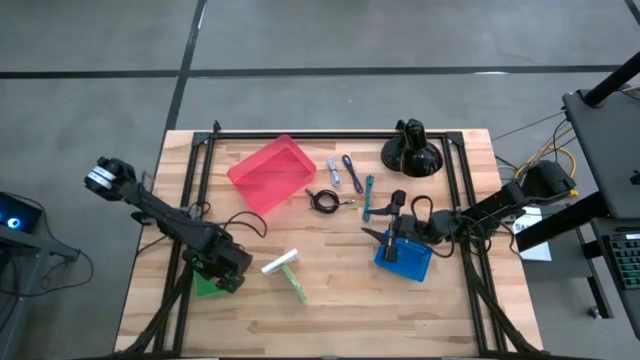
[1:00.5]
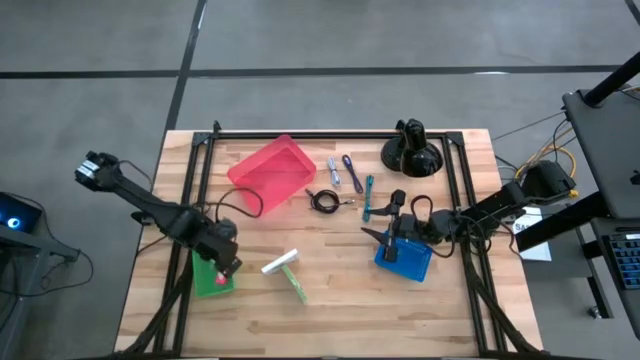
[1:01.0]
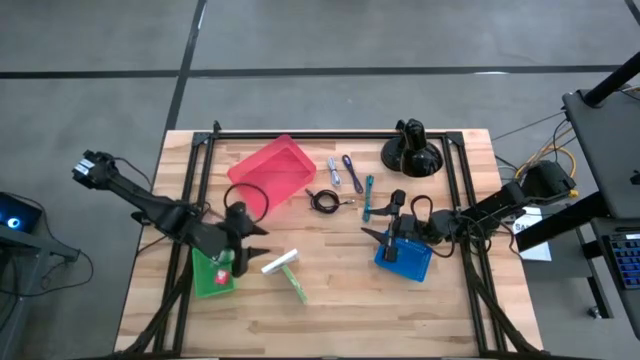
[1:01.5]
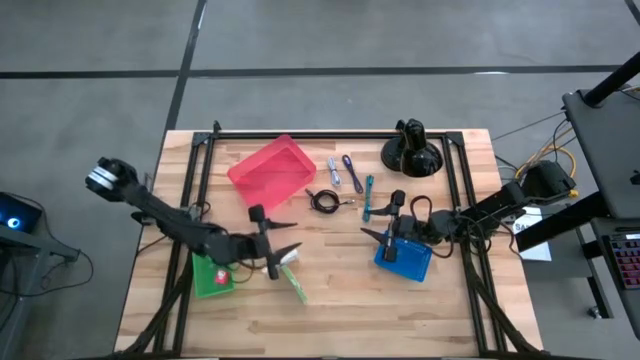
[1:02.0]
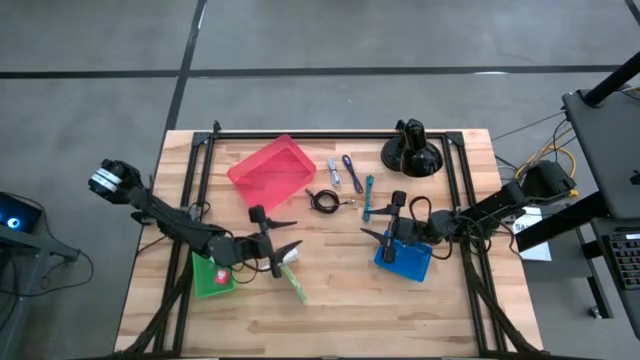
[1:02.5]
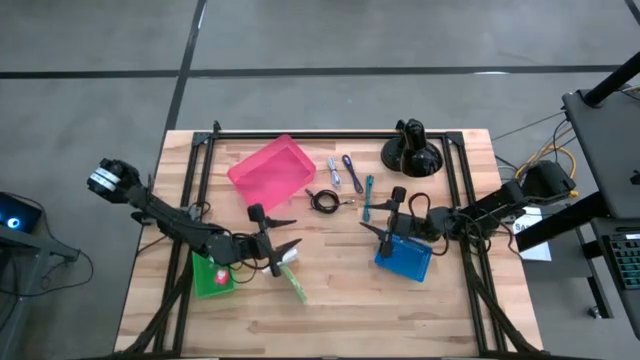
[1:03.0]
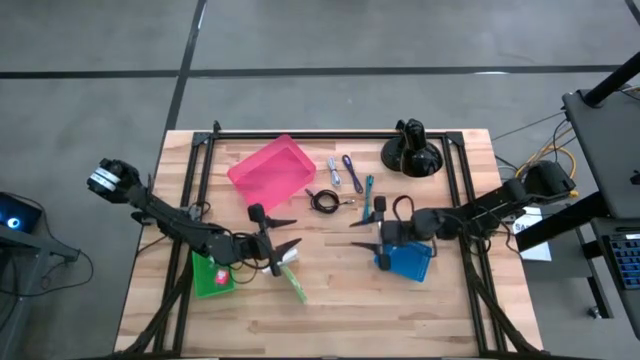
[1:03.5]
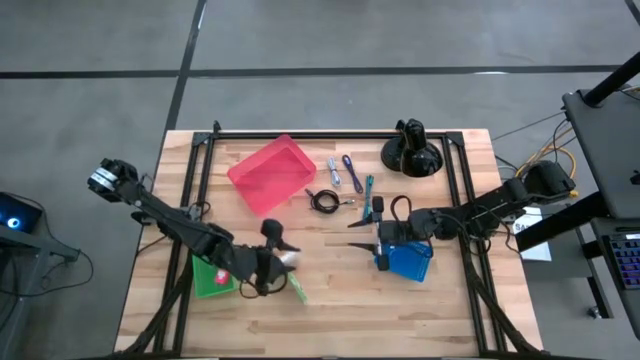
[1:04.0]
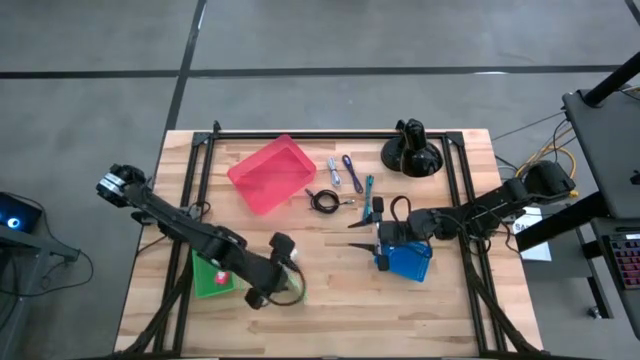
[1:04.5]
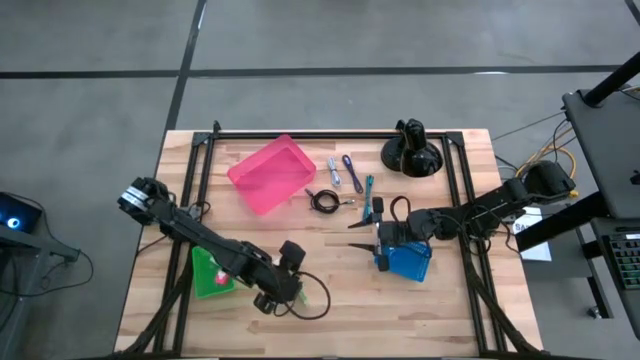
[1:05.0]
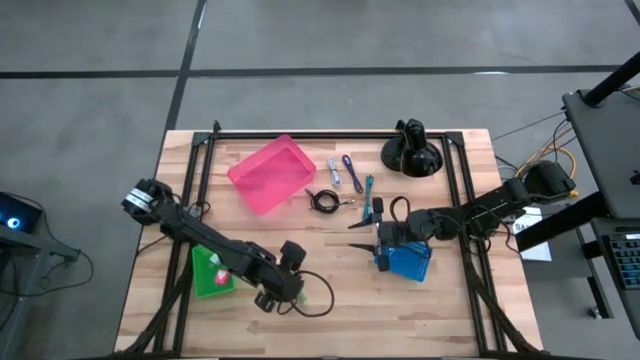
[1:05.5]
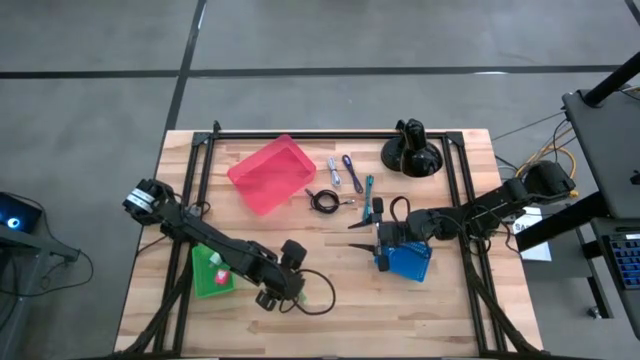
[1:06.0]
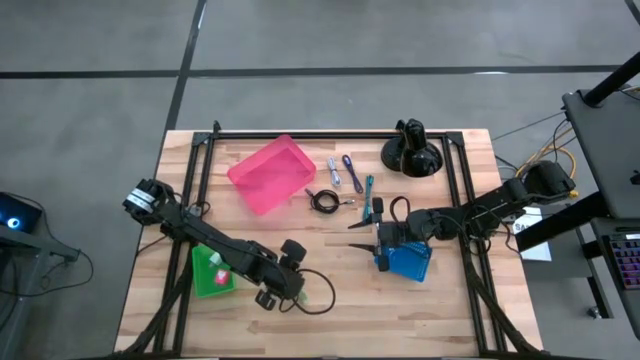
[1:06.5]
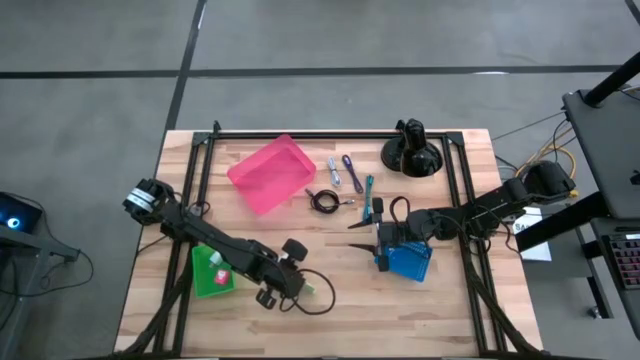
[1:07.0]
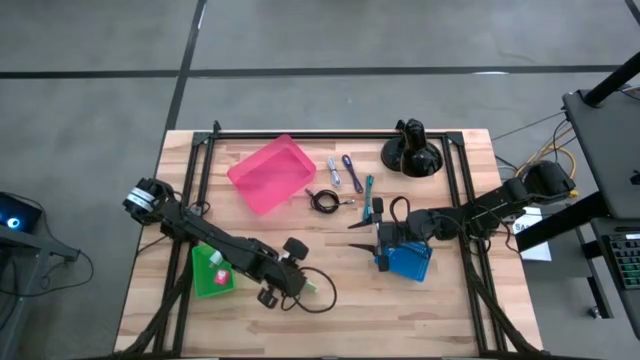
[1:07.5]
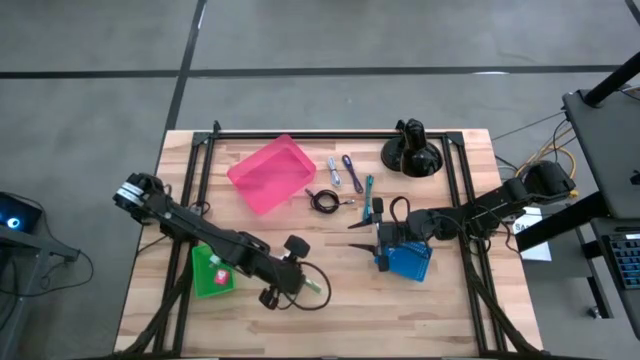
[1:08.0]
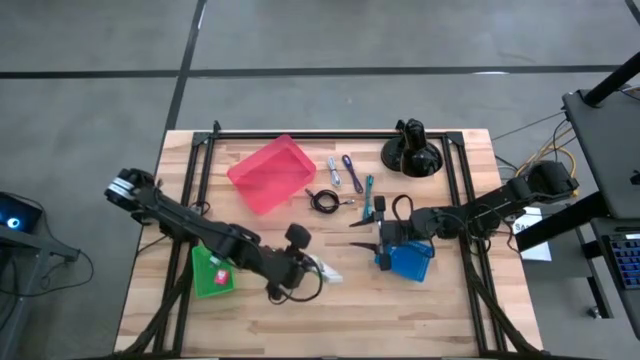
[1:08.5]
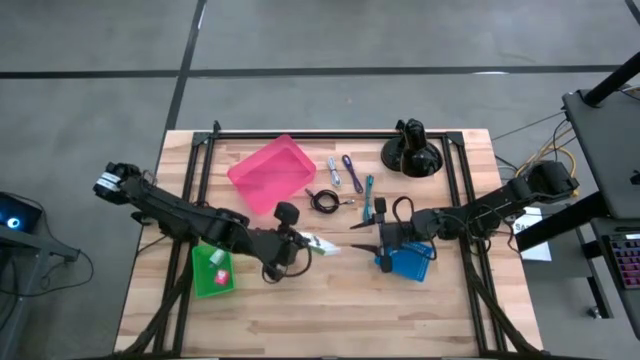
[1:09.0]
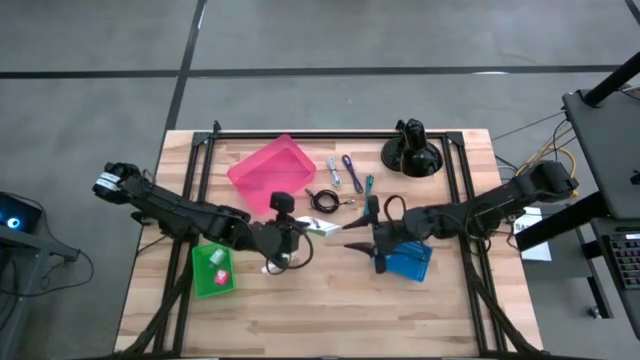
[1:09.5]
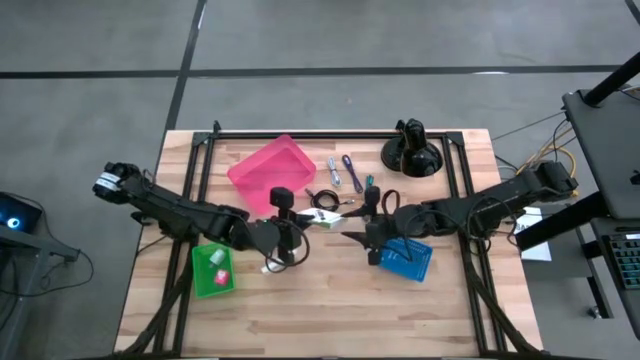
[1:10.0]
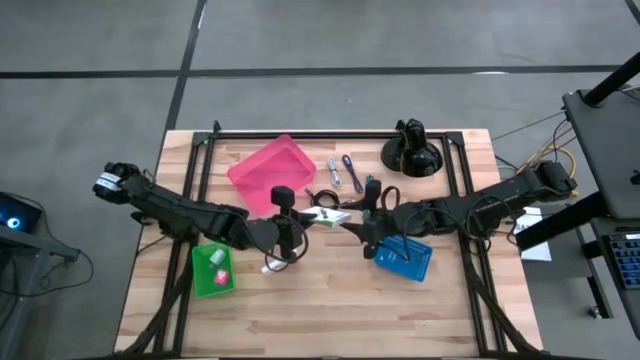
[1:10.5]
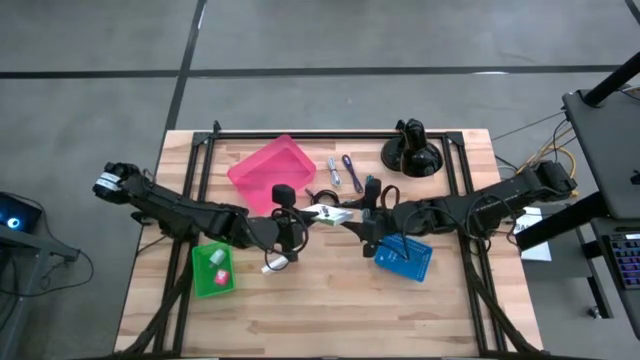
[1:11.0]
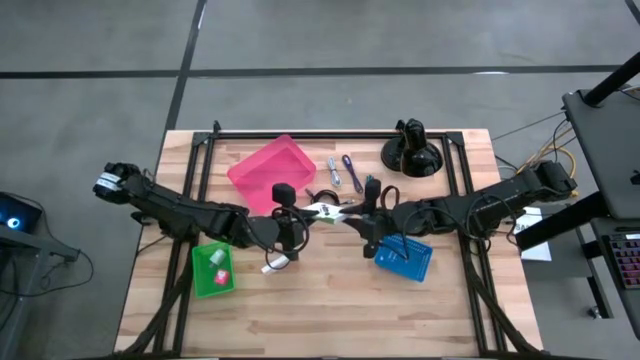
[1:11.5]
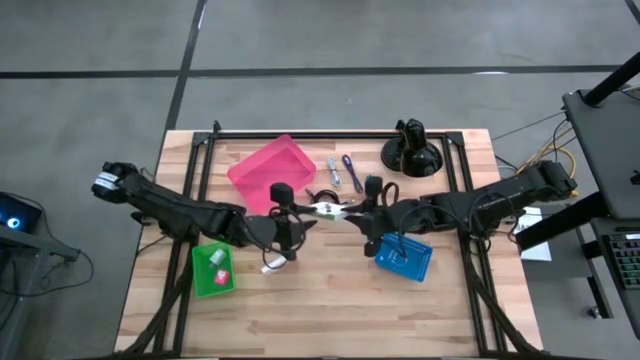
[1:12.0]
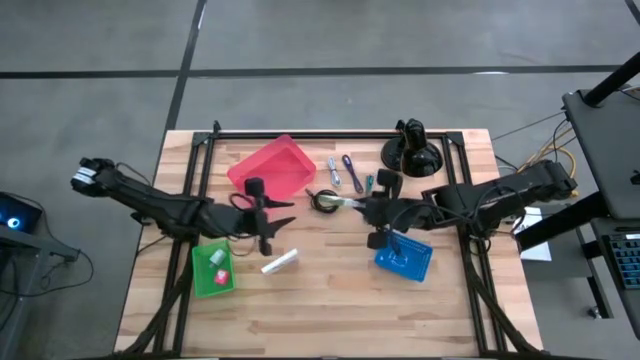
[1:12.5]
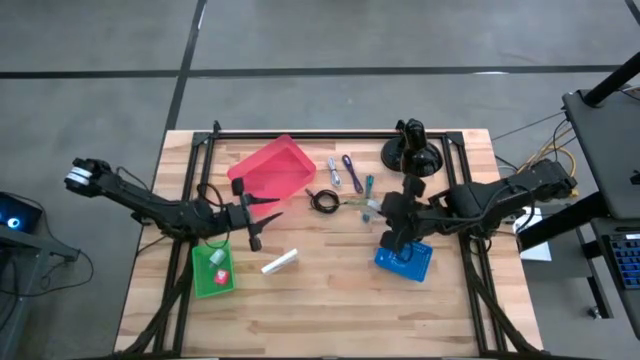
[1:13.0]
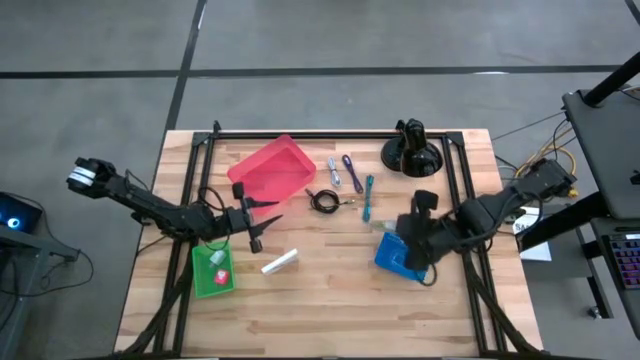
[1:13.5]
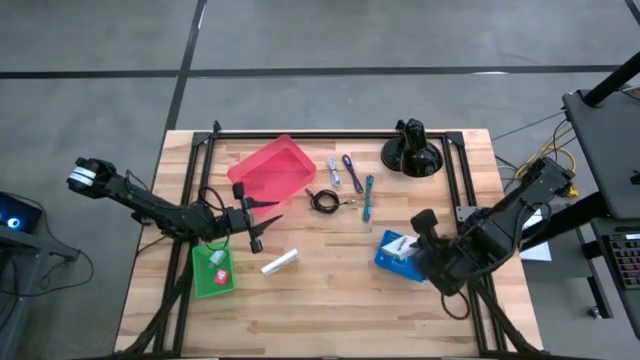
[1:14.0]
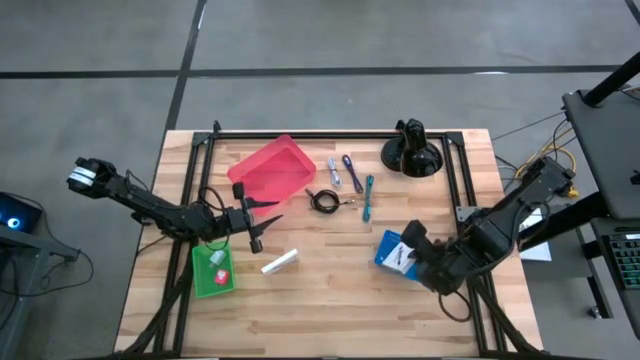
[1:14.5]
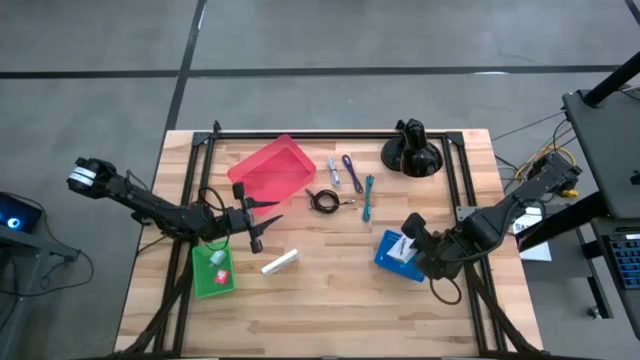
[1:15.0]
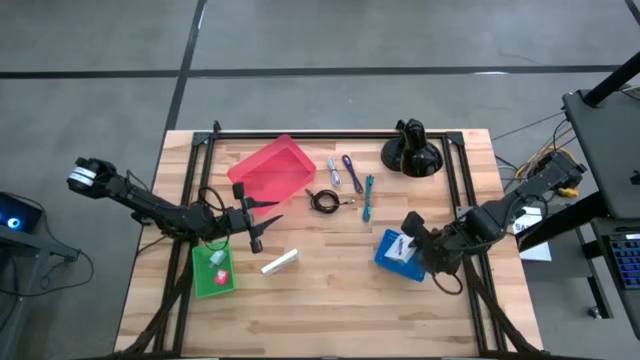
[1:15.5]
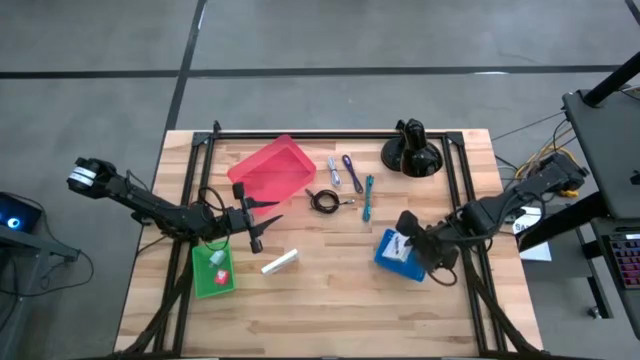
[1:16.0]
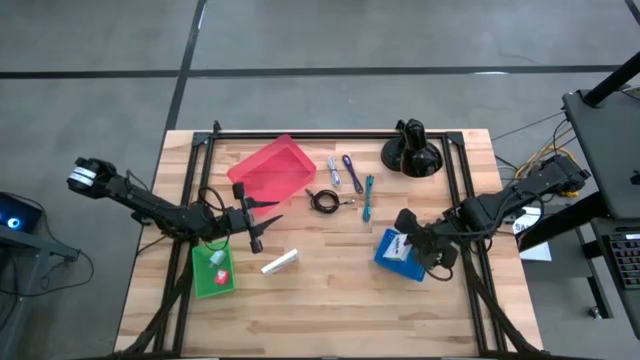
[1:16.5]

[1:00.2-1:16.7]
Task: Pick and place items into bin
Put the bottom card reader box into the blue bin
